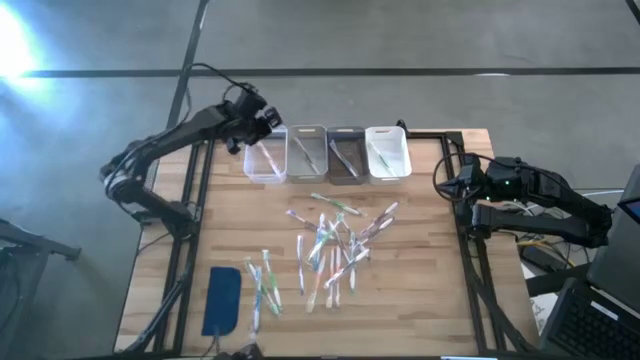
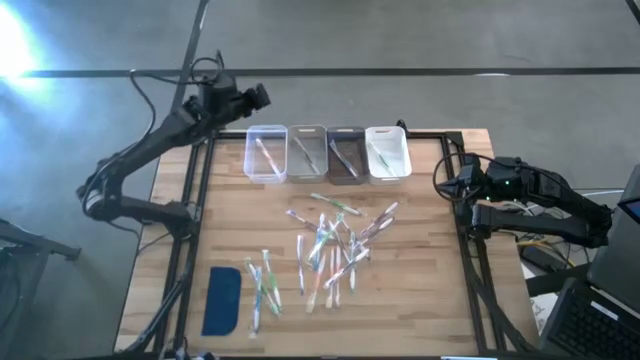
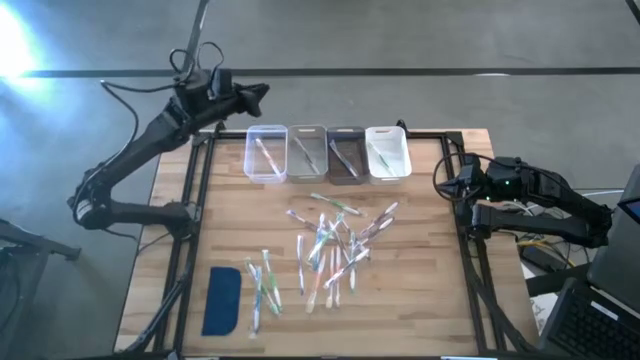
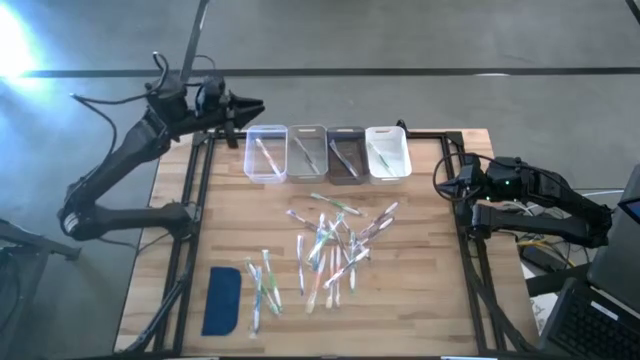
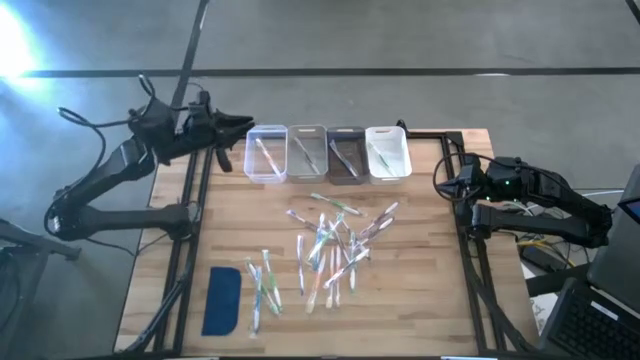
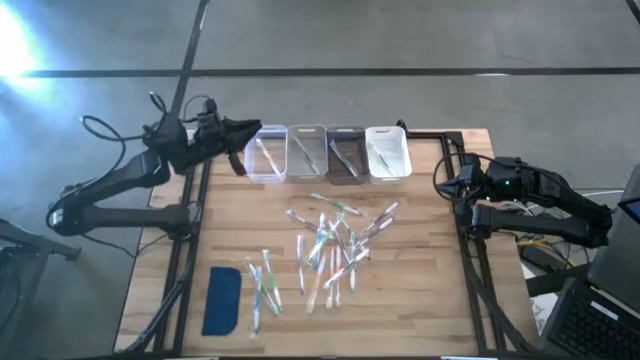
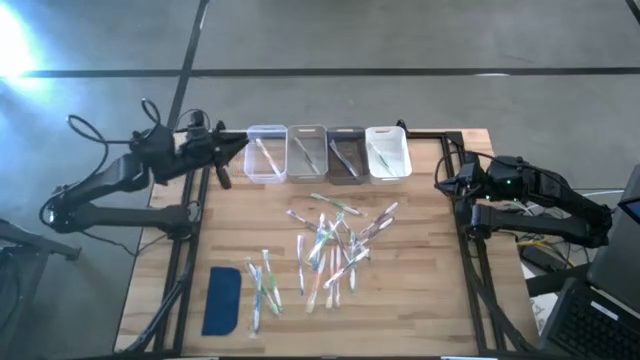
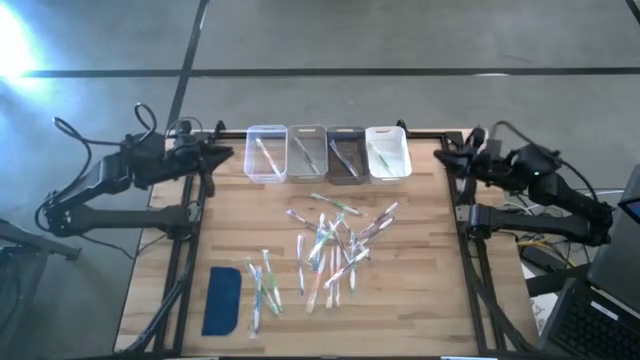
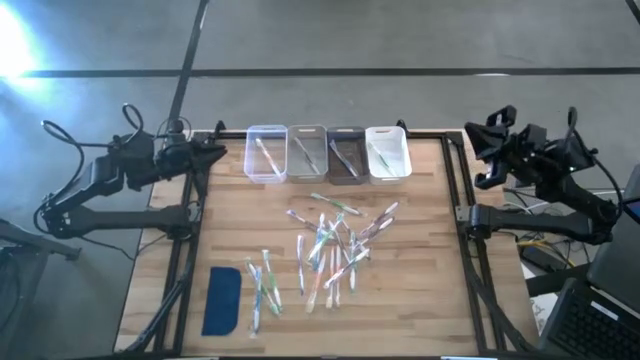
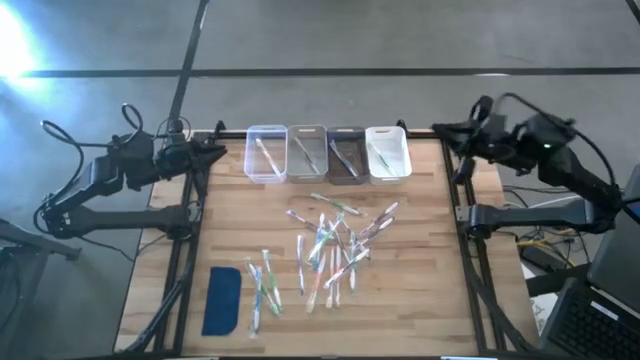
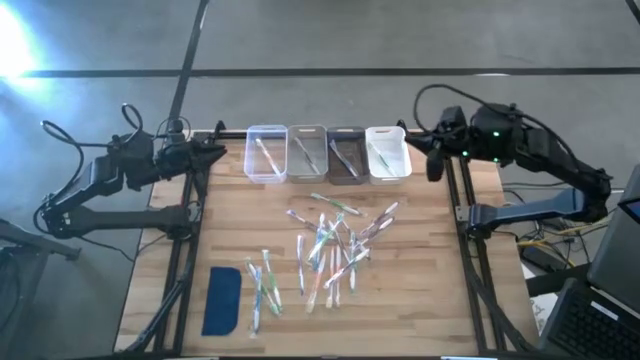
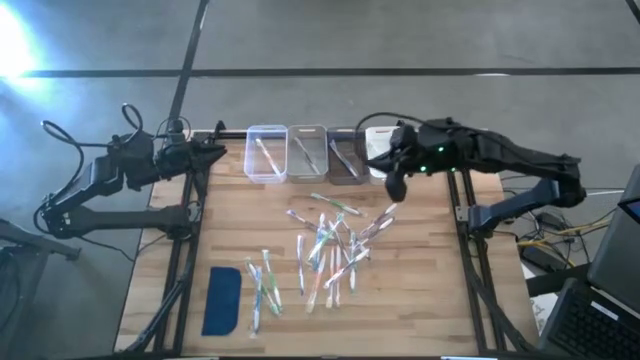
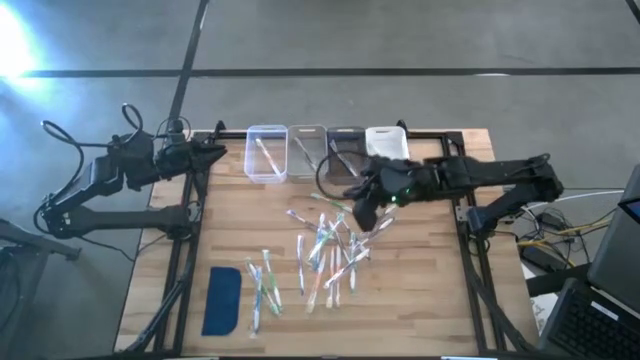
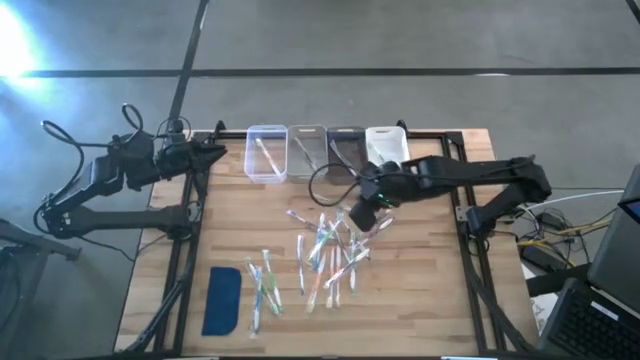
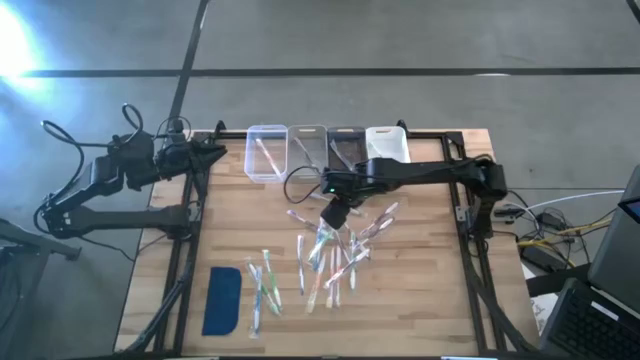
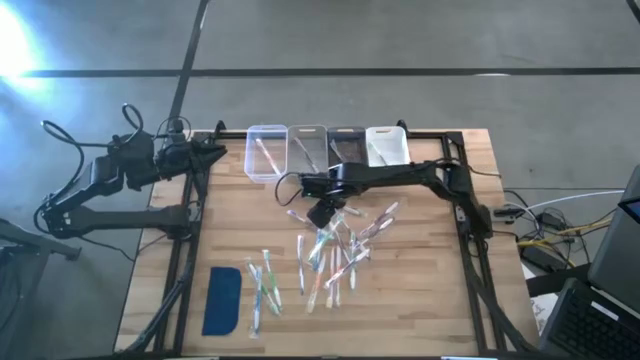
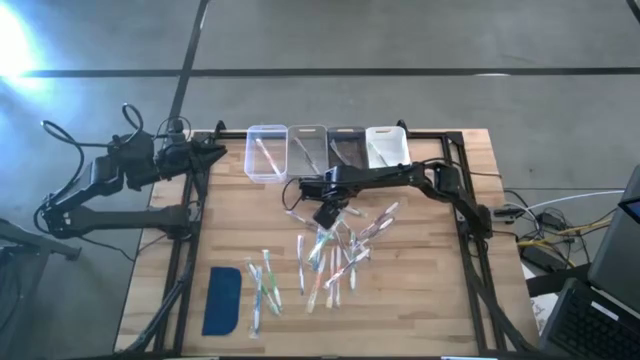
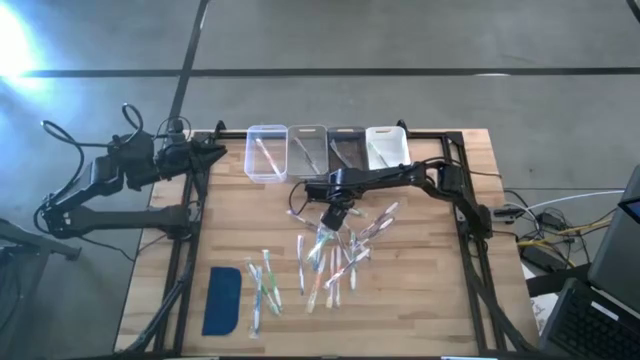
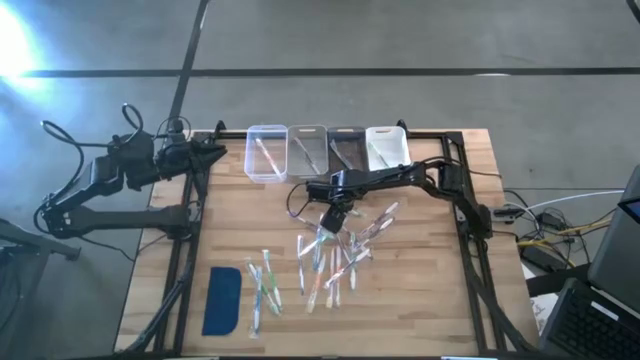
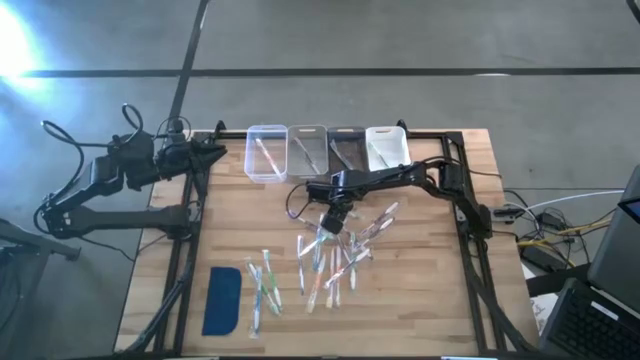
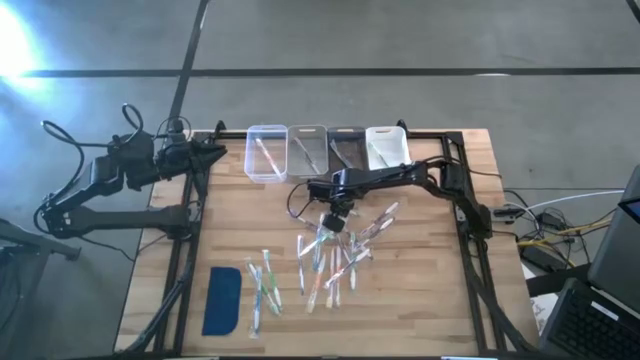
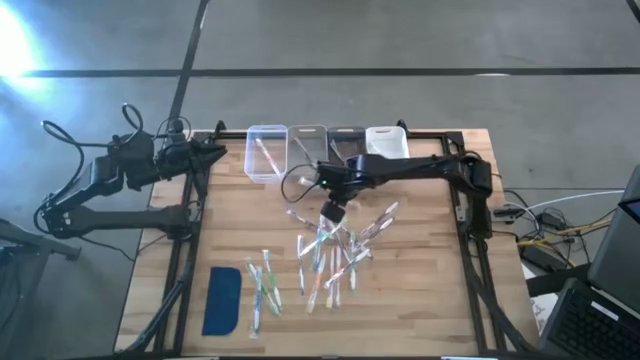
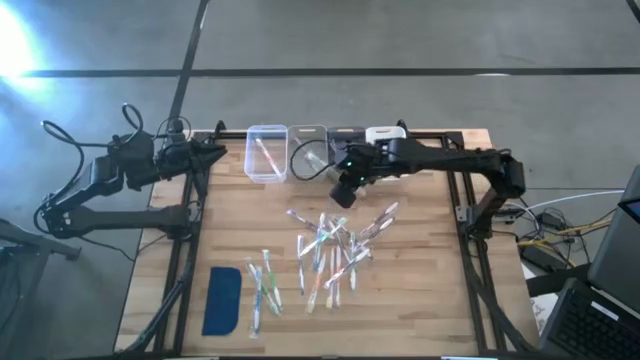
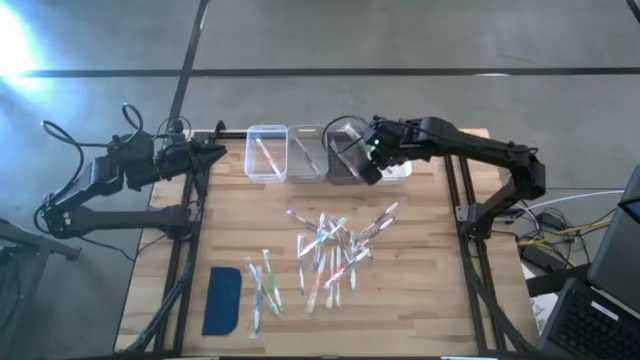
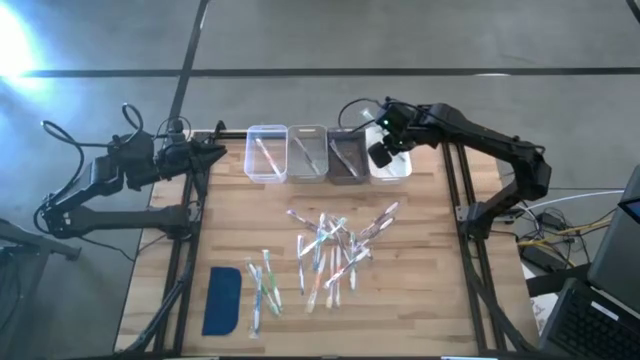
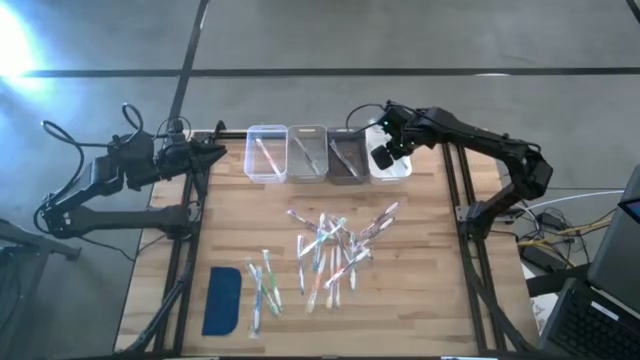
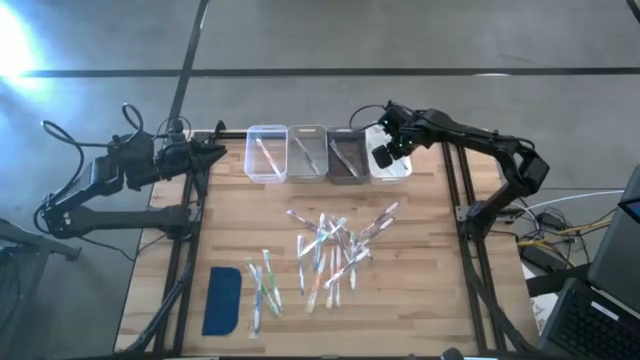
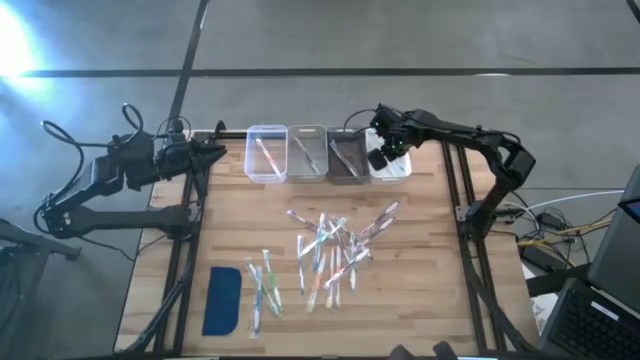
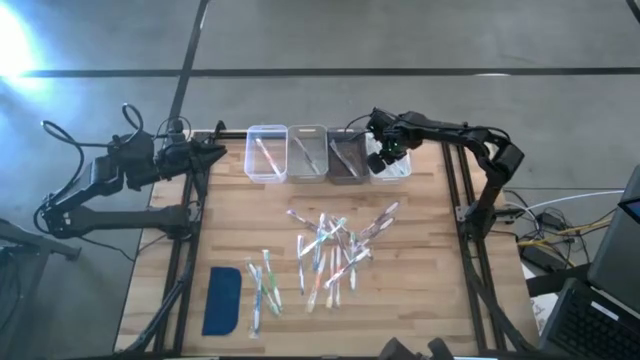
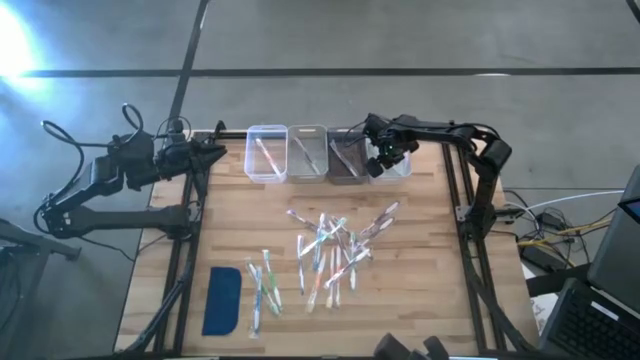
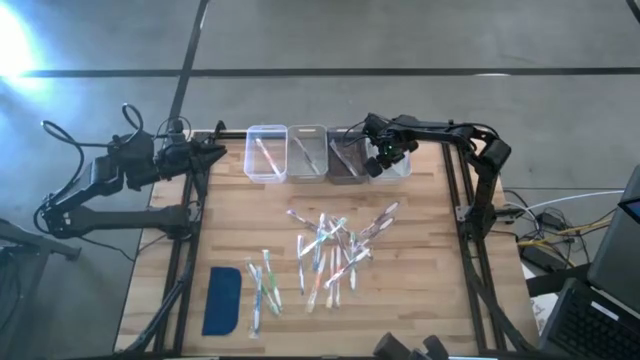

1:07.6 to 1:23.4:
Task: Pick & Place Toothbrushes
Put the green toothbrush into the white bin

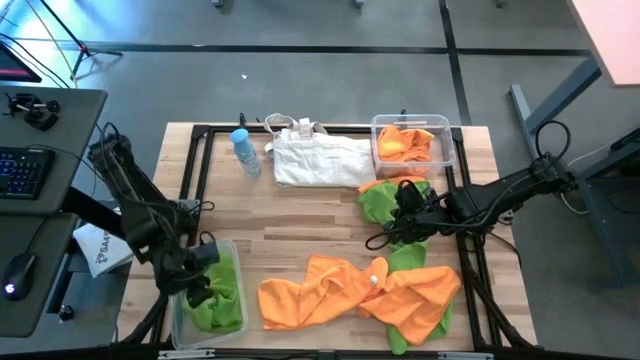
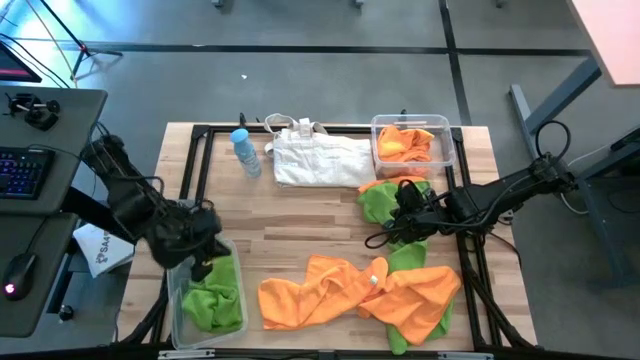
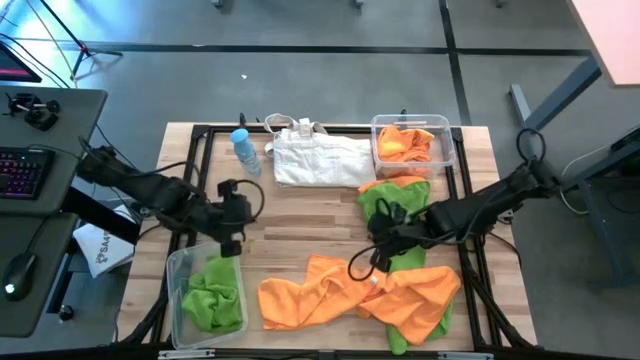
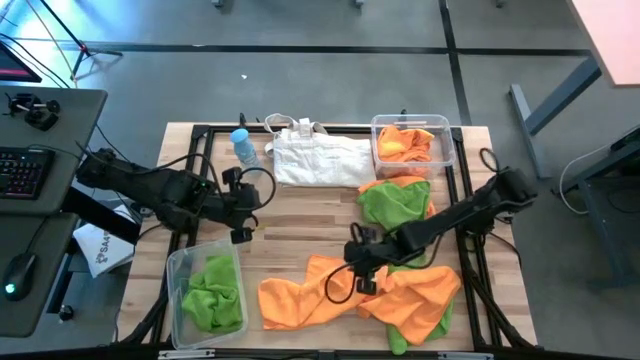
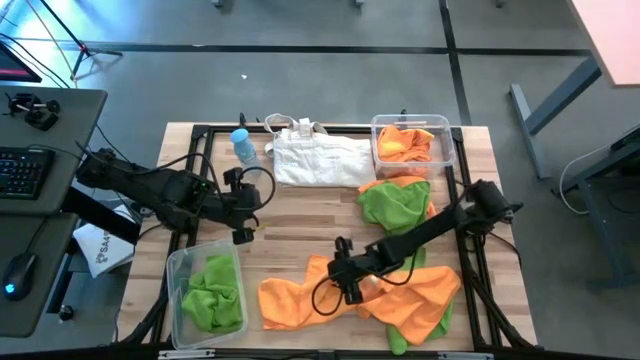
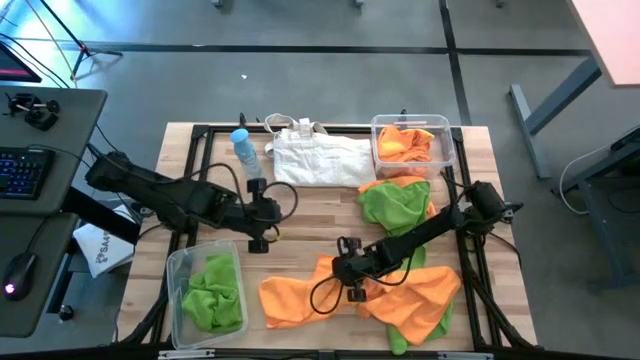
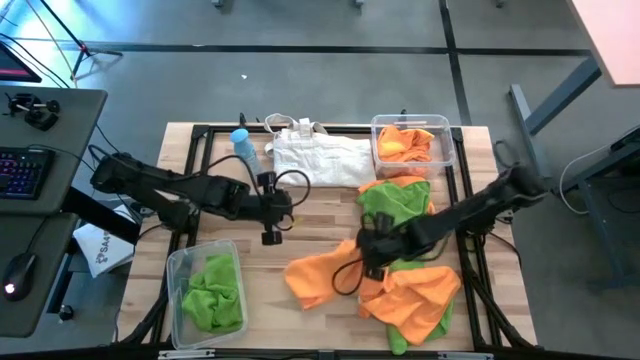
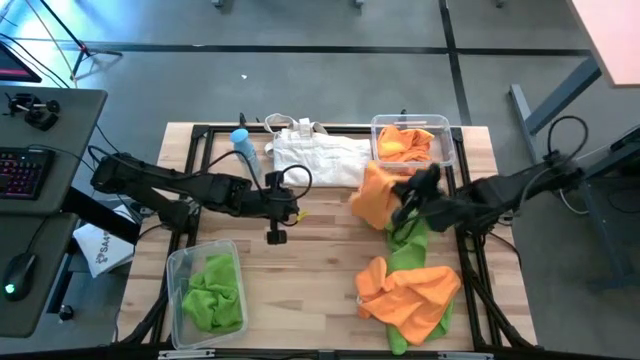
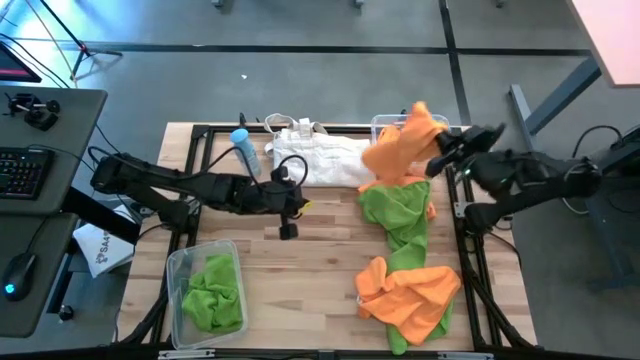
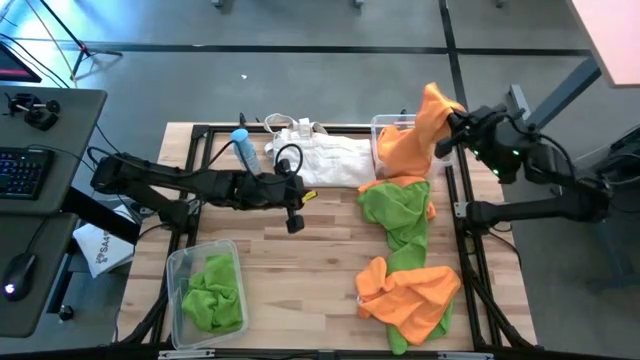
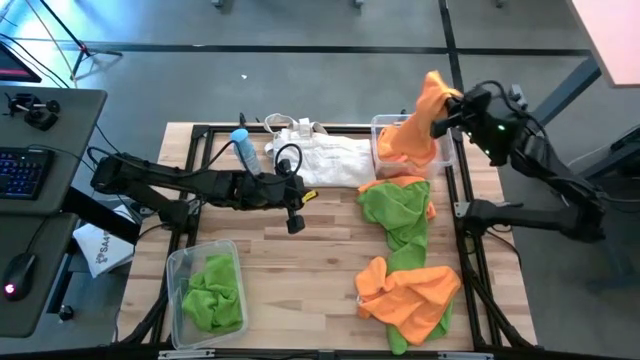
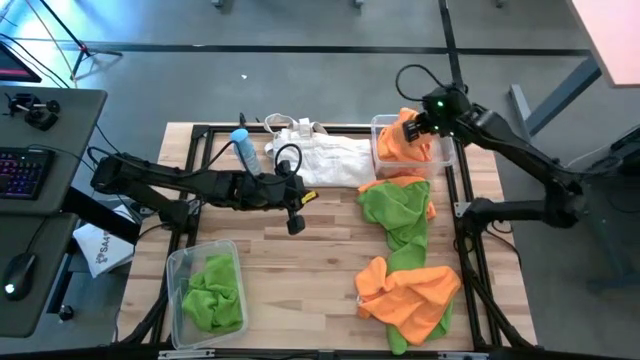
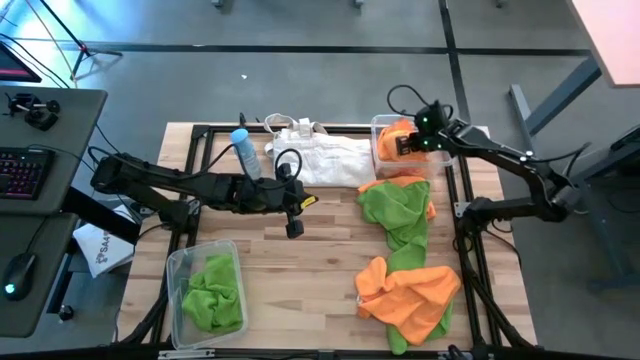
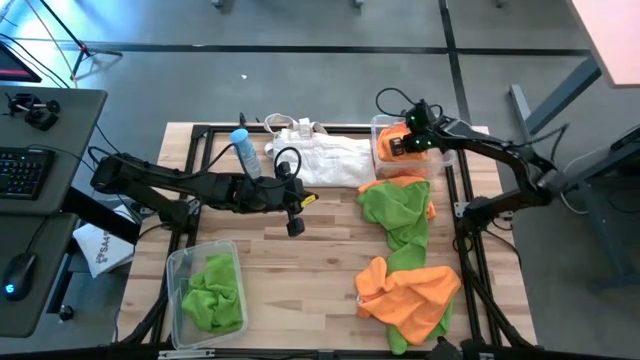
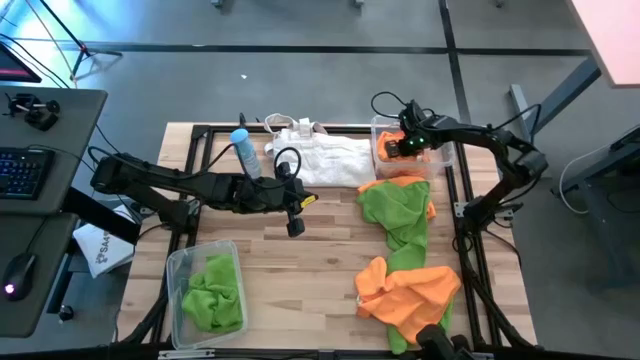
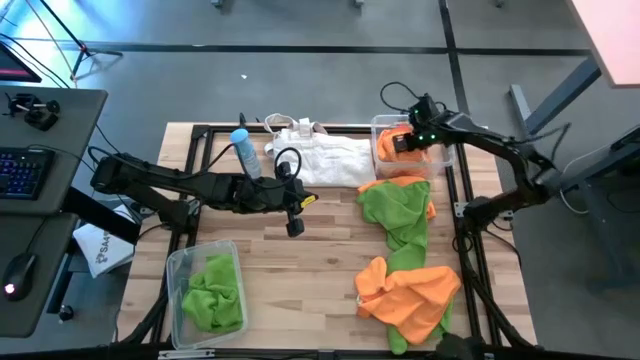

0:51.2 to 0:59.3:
Task: Sort microfiber towel by color & place in baskets
Put the orange microfiber cloth into the top transparent bin
